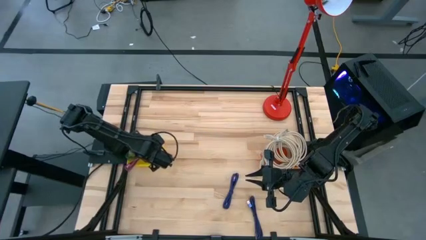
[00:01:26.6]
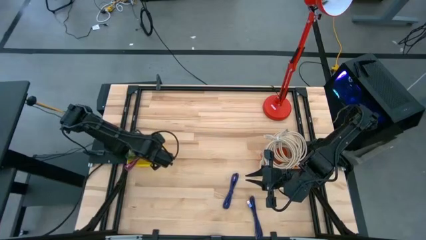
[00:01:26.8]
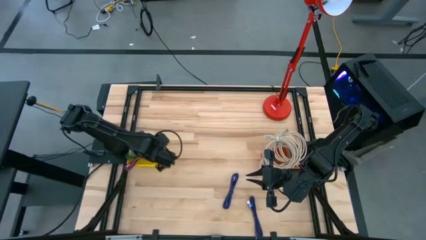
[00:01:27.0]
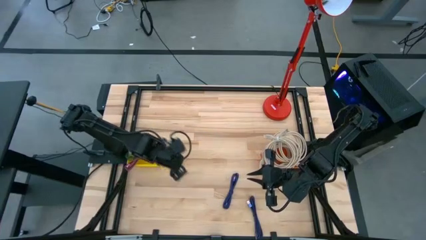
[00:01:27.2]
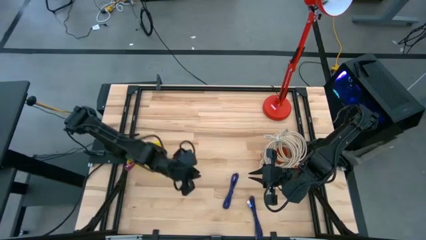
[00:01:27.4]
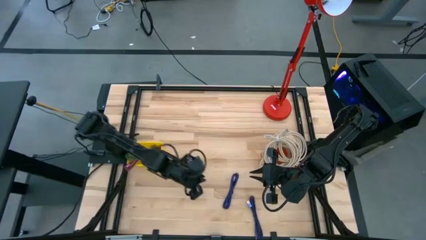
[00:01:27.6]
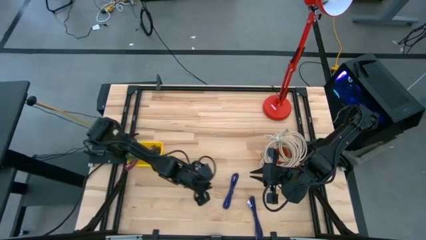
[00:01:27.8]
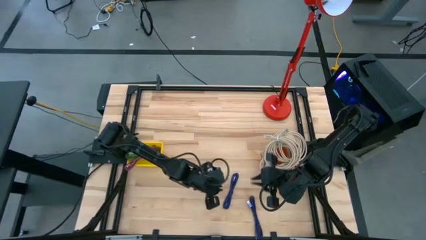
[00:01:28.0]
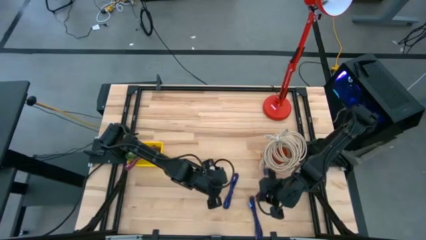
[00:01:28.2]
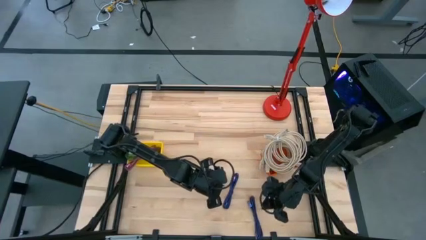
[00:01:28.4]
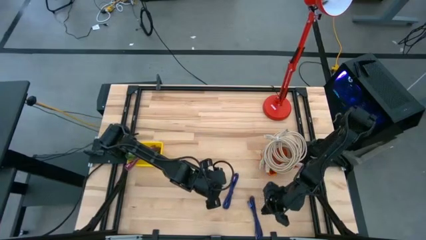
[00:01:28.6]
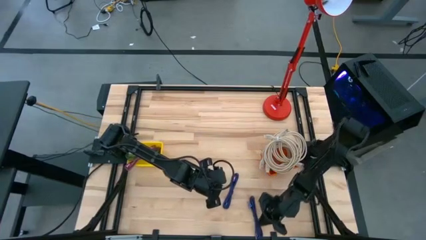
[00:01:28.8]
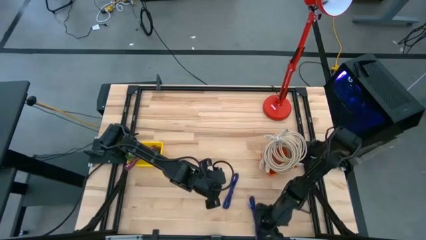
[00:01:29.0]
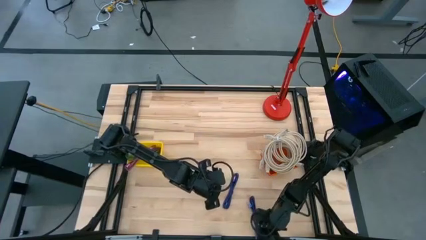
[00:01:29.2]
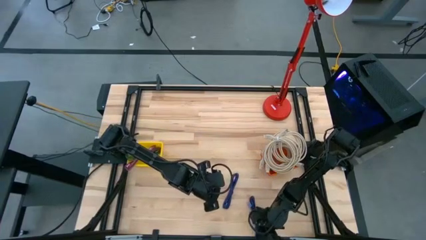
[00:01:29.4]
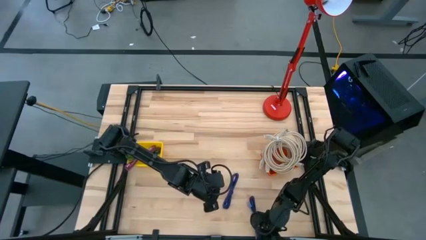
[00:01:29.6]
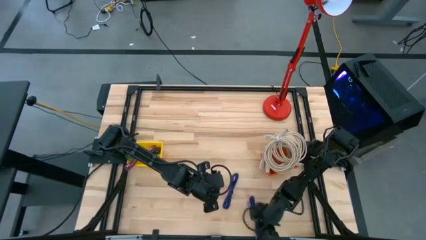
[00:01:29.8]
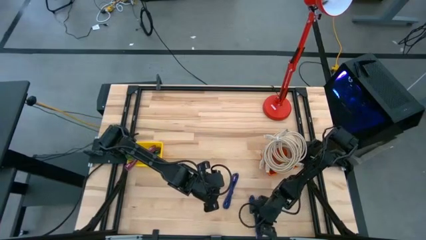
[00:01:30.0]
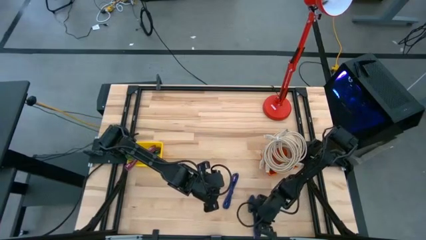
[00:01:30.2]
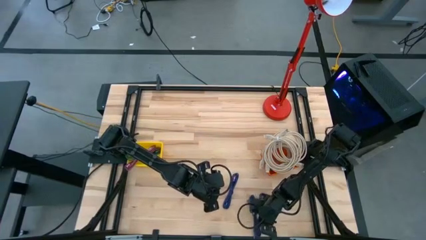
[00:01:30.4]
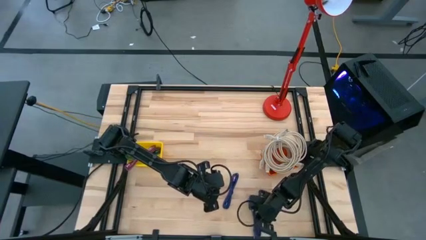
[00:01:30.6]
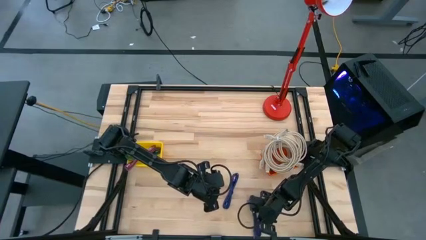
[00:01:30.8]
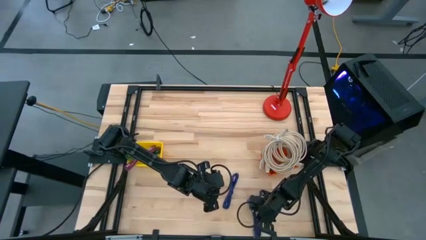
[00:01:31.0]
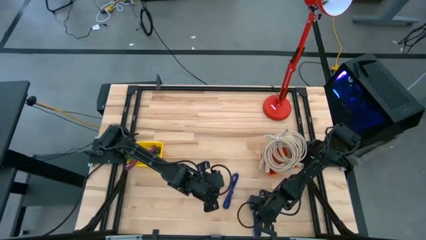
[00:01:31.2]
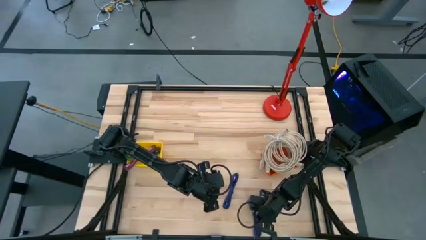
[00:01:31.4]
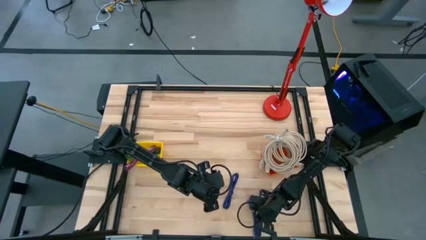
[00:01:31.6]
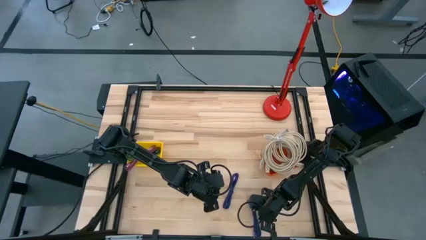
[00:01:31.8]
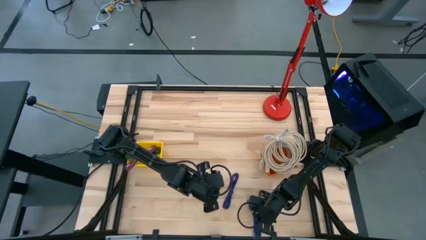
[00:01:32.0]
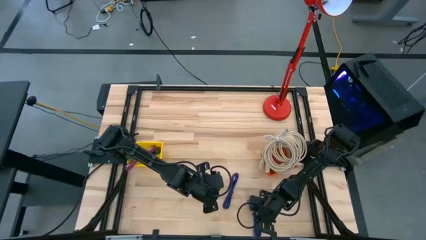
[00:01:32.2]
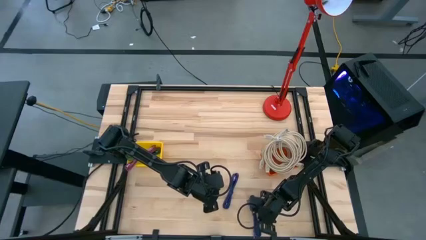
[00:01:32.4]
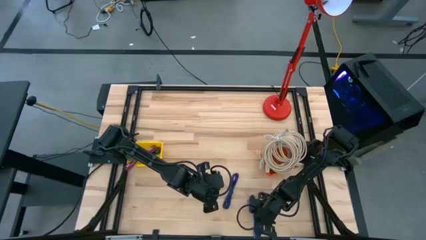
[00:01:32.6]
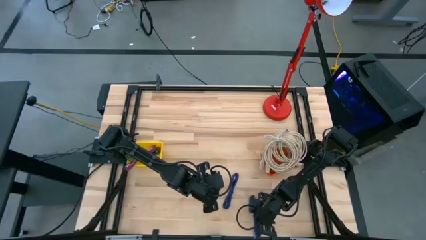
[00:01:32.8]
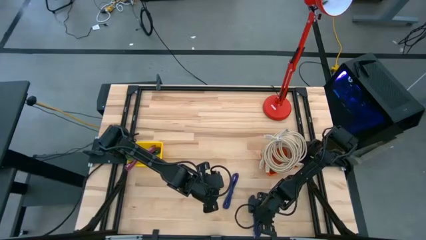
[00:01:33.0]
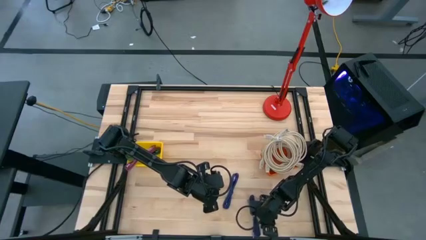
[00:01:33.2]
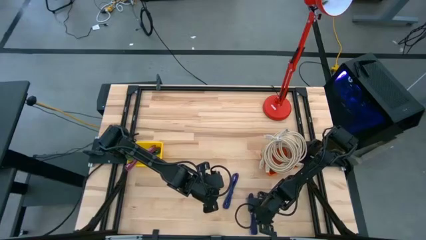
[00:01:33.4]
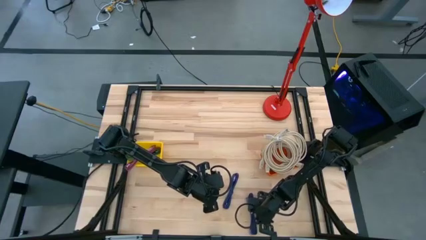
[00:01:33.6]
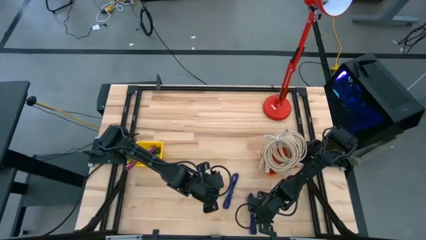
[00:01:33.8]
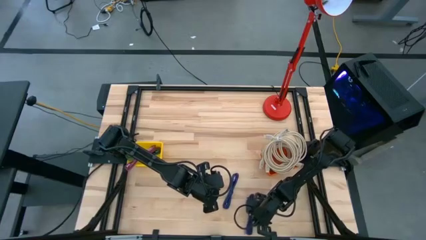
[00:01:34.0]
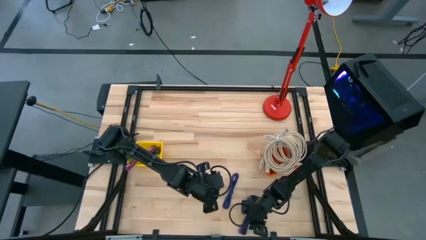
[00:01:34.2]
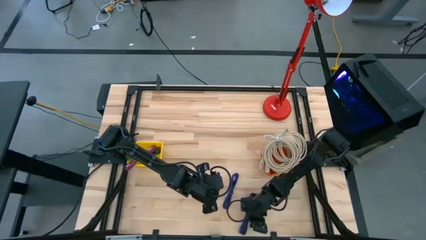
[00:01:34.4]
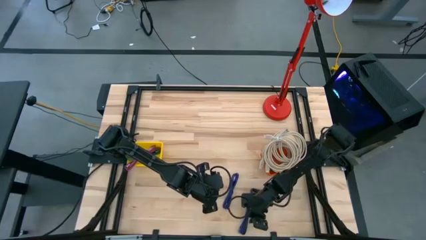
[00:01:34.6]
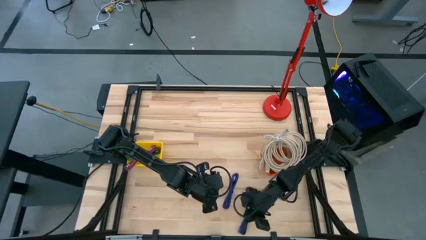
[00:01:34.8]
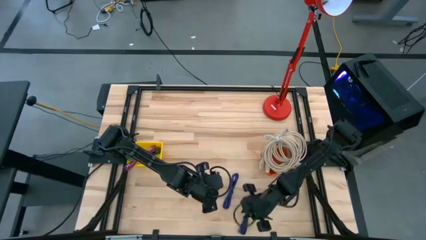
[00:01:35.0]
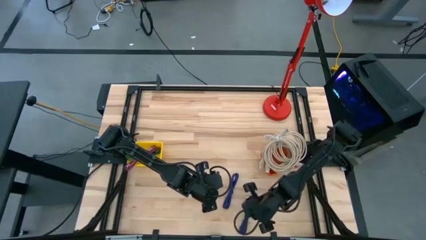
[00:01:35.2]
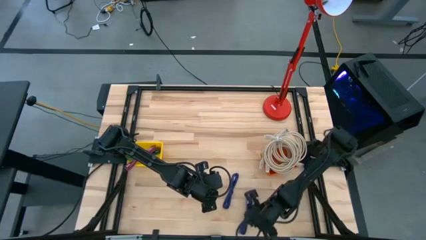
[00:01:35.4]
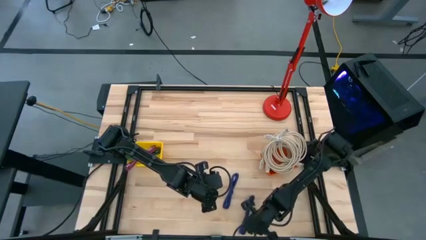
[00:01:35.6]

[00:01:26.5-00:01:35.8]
Task: Pick & Place USB Port
Put the black and purple charger cable into the yellow bin

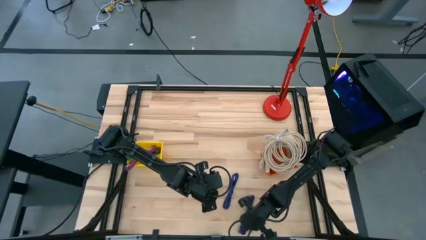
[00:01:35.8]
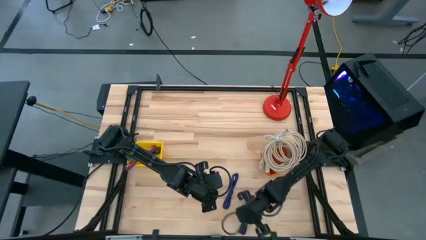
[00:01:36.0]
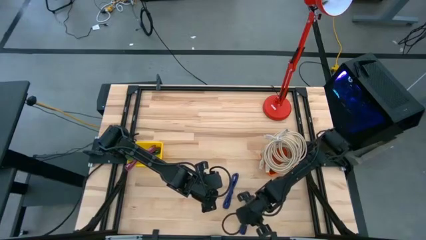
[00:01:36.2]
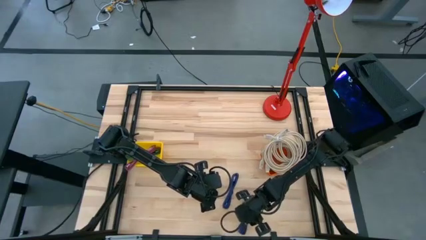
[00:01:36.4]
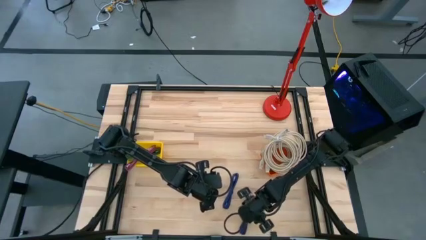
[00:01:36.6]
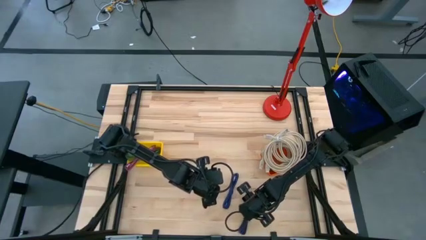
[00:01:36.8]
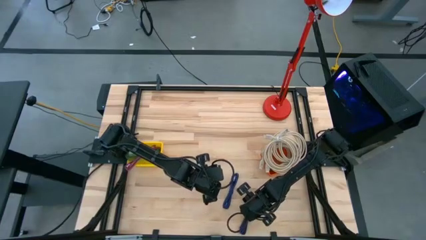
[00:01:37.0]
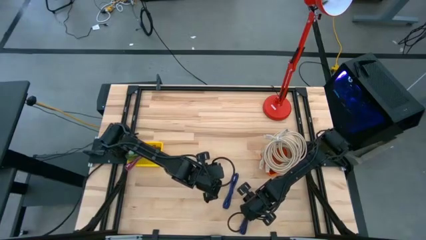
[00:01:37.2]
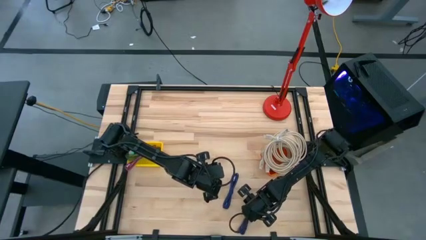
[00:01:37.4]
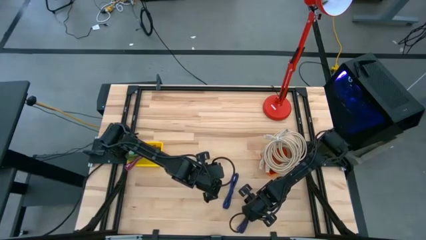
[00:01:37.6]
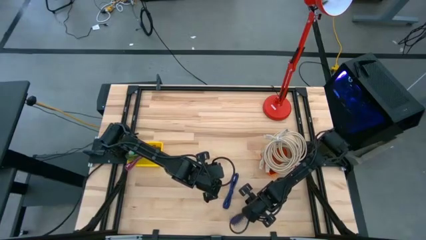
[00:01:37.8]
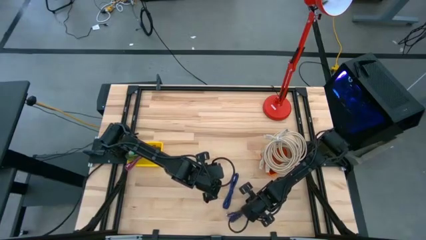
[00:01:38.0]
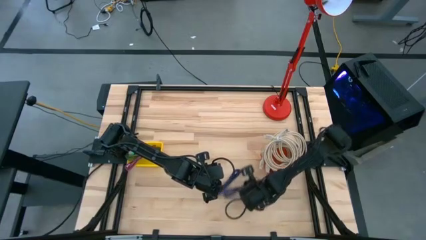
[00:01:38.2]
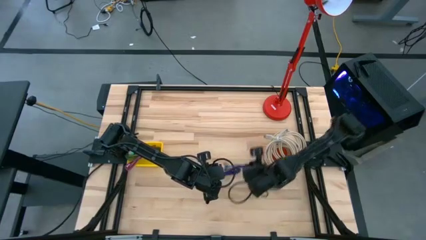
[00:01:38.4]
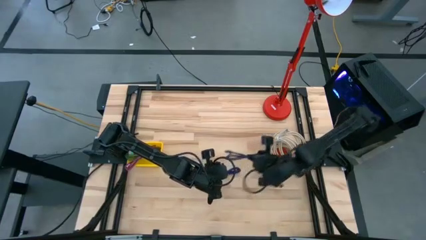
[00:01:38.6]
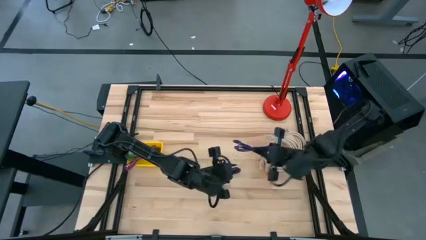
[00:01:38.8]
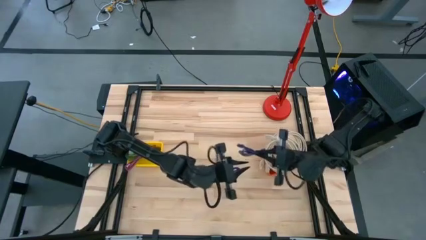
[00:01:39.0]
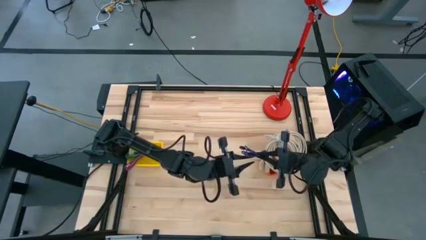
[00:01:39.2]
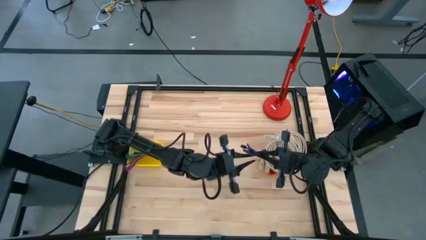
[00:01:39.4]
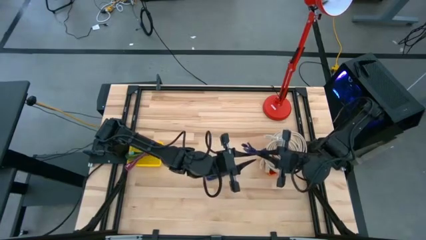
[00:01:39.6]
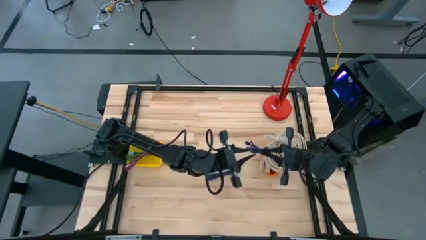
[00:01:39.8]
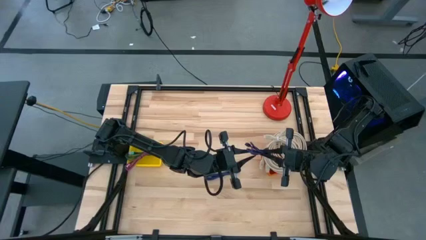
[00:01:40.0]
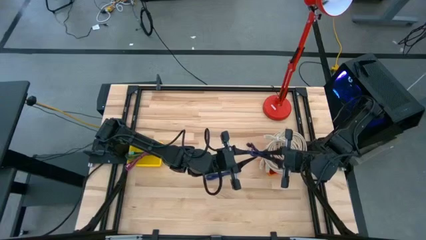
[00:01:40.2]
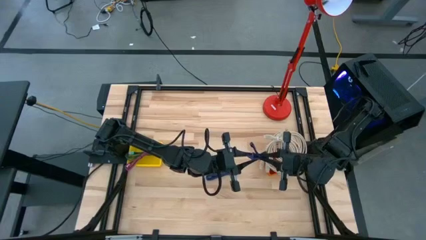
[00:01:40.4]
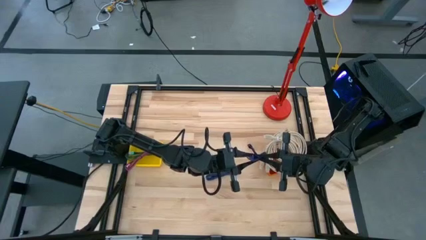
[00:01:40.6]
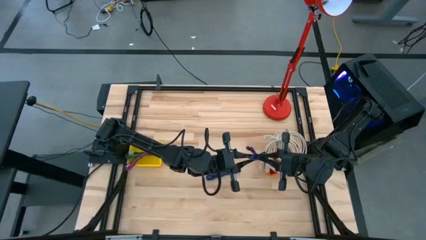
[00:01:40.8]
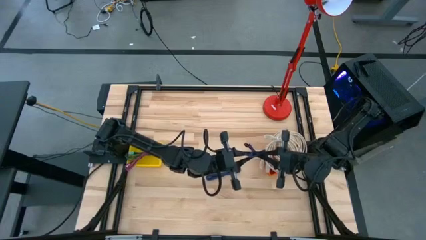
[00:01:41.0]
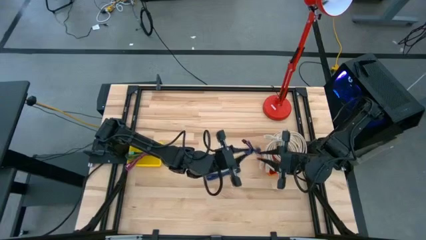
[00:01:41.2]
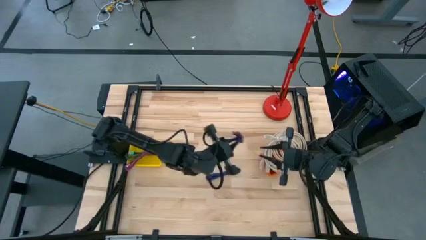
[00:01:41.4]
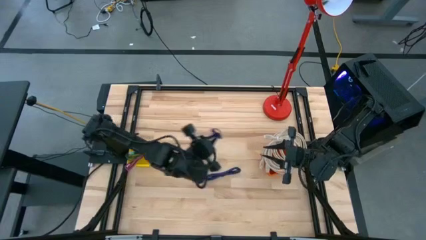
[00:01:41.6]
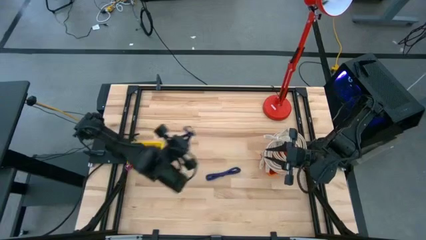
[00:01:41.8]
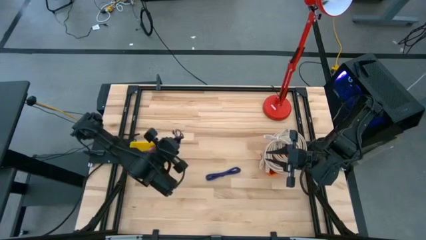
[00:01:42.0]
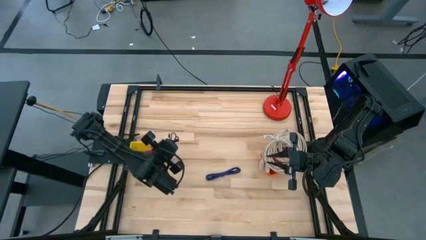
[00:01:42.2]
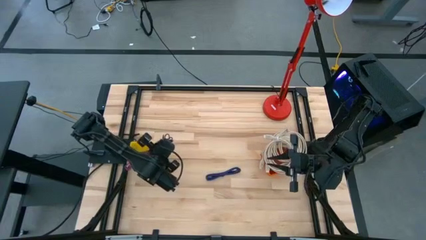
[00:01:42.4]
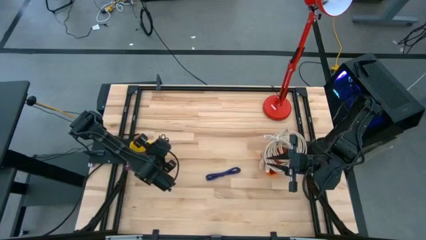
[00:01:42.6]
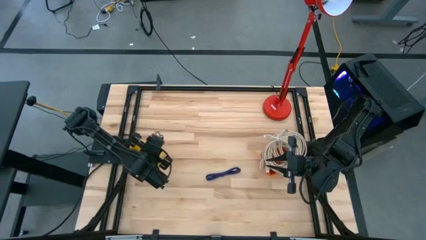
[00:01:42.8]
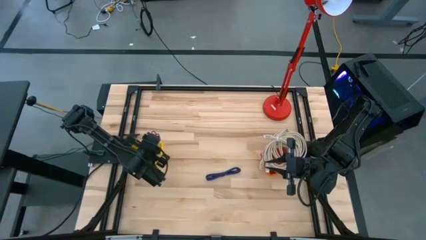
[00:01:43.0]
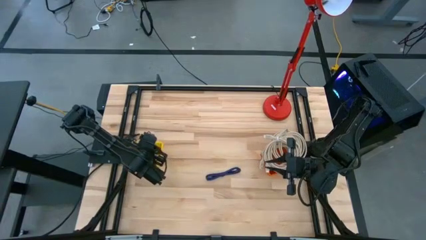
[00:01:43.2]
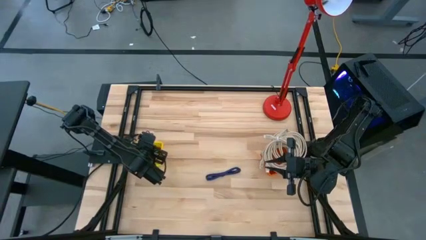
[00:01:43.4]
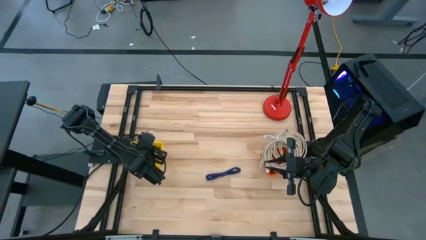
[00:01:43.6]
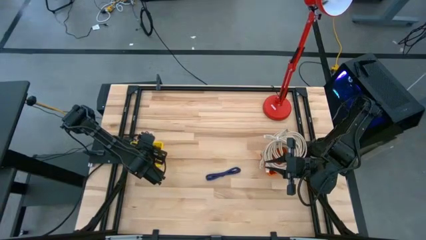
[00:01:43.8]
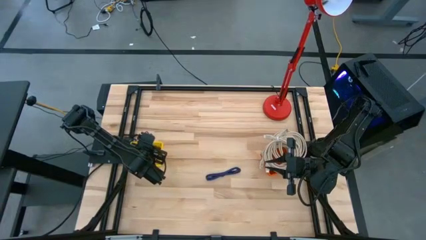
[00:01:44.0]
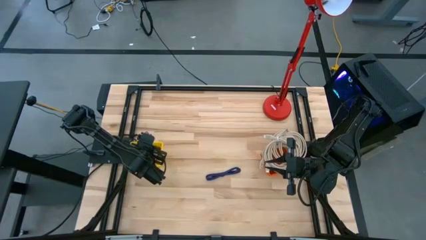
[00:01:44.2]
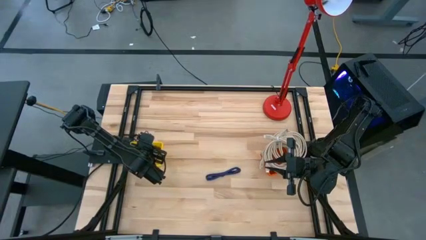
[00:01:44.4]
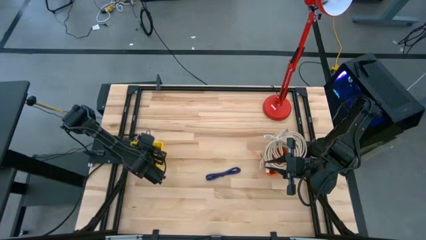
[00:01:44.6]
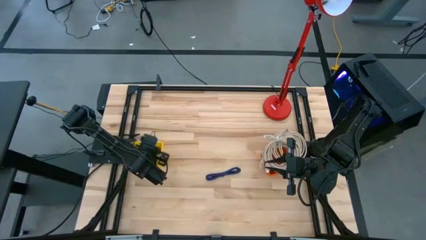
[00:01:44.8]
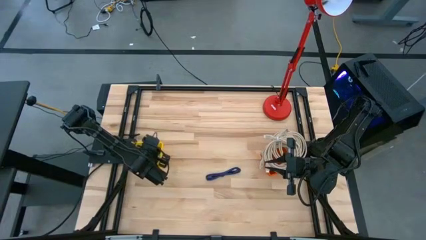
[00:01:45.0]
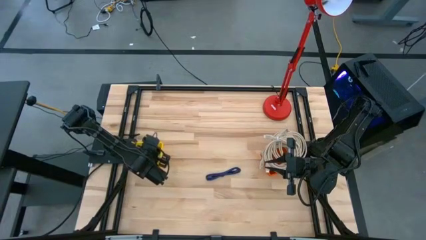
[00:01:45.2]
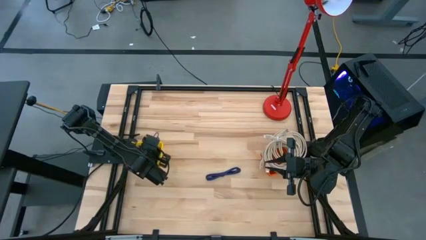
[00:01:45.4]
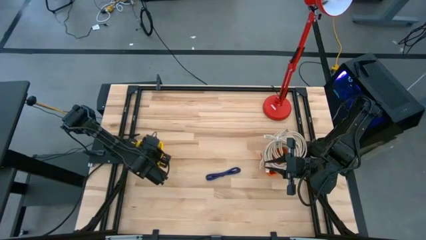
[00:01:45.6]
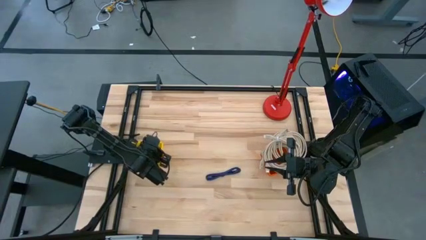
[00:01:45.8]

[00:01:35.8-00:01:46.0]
Put the black and purple charger cable into the yellow bin
